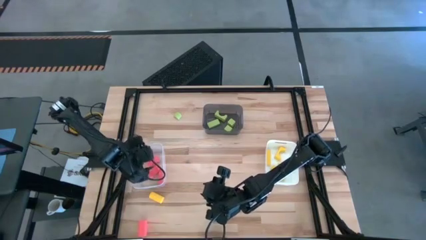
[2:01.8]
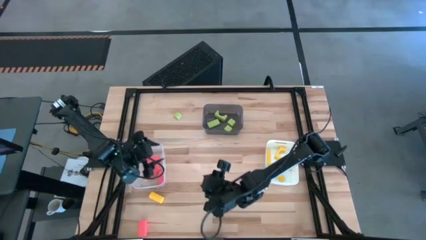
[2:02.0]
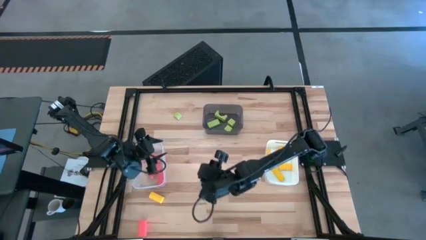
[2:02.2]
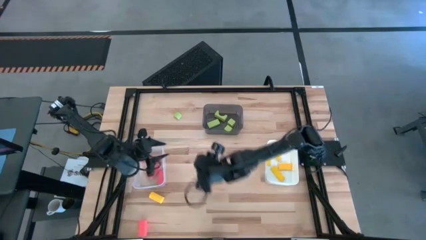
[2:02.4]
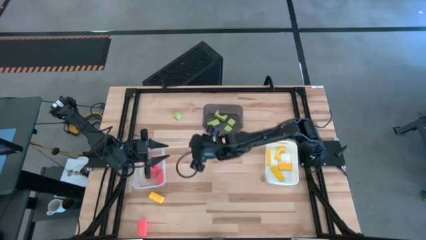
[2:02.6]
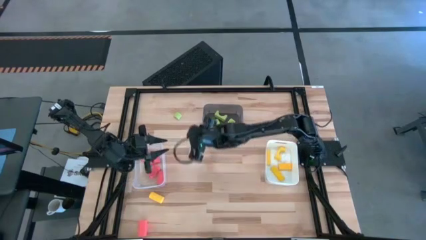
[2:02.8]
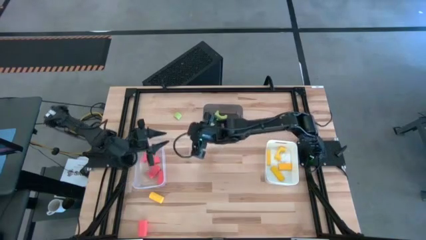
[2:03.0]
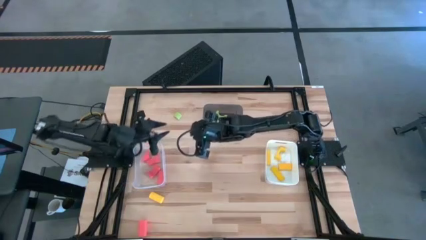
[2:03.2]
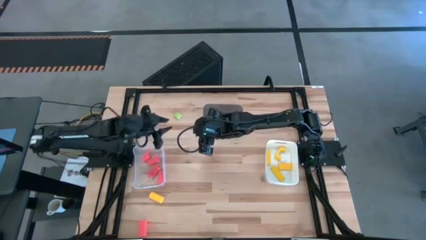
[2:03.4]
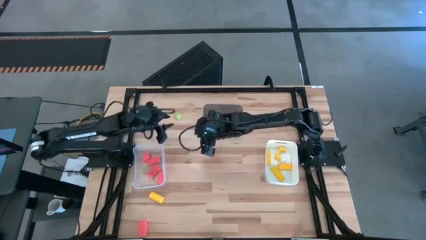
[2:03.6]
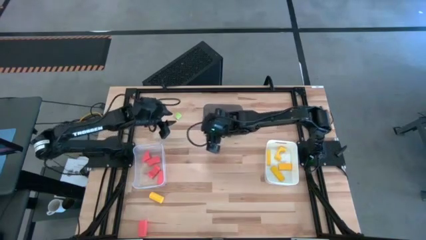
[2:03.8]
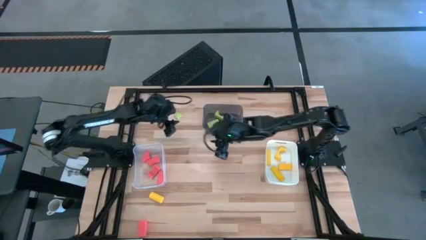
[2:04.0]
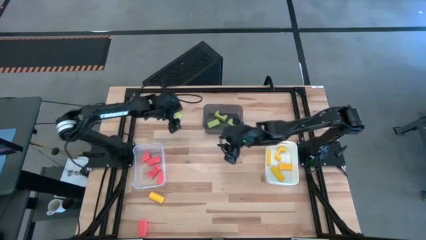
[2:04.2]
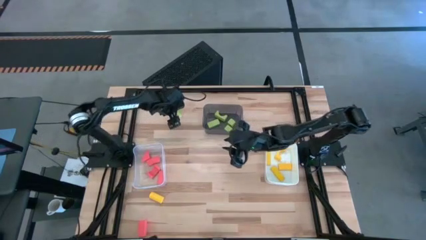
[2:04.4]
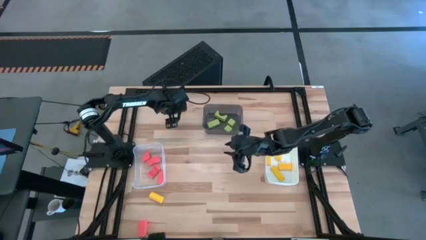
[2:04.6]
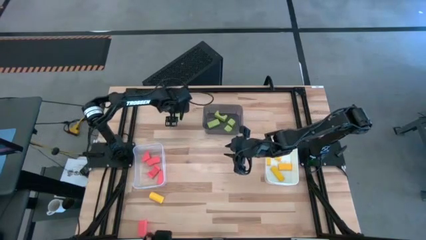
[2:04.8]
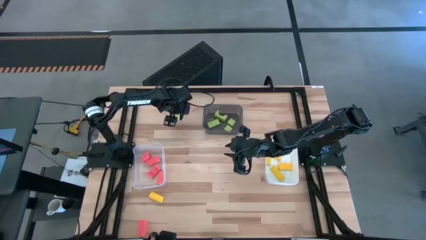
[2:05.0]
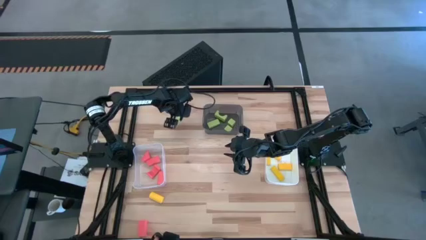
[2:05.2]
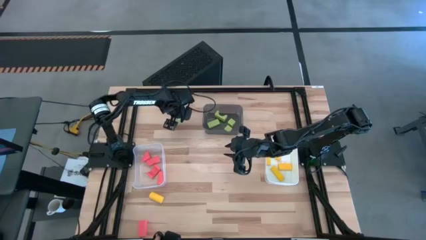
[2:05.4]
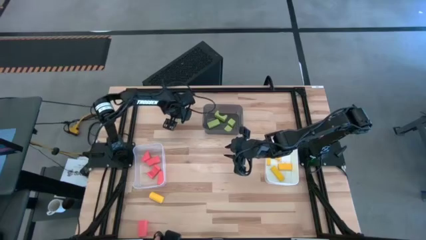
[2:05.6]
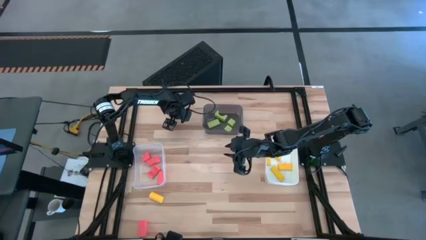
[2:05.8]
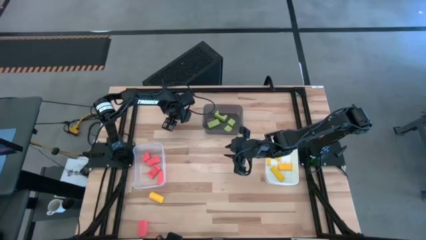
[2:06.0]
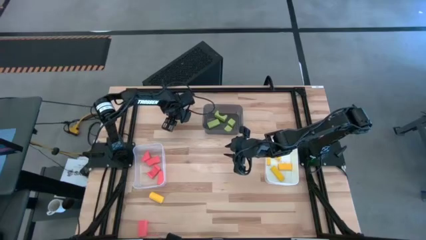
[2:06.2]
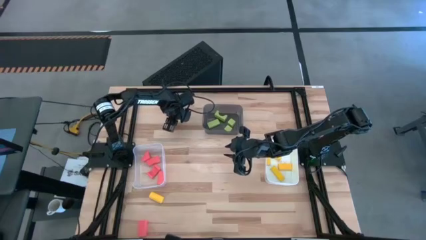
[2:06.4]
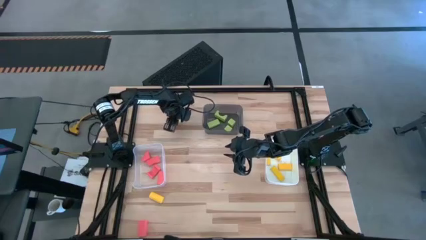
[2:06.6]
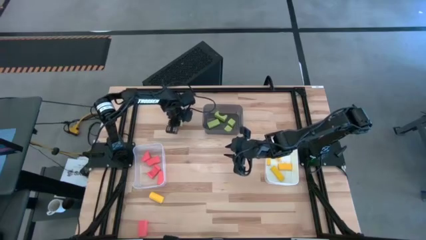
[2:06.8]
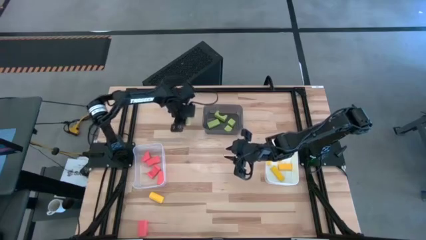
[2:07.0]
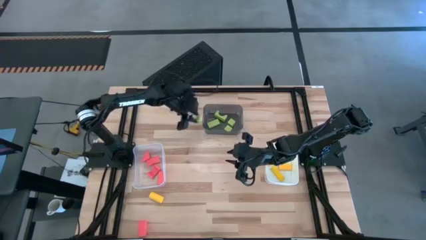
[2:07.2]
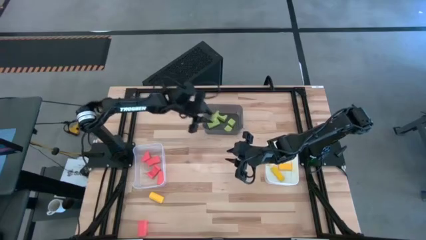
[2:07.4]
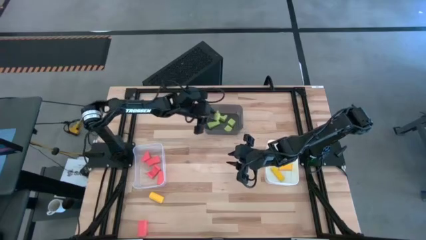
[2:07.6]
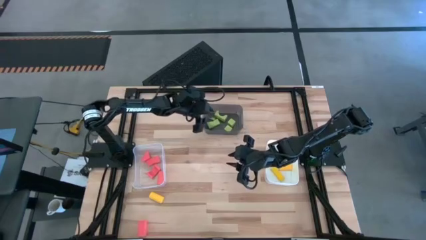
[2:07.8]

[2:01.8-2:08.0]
Task: Sort & place blocks by color
Put the green block into the black bin

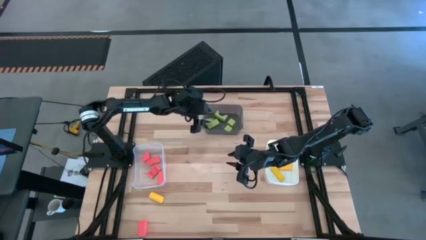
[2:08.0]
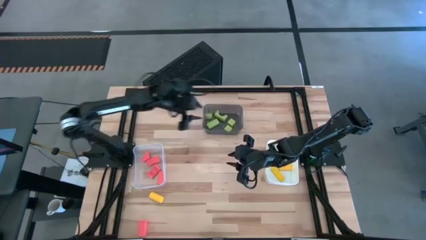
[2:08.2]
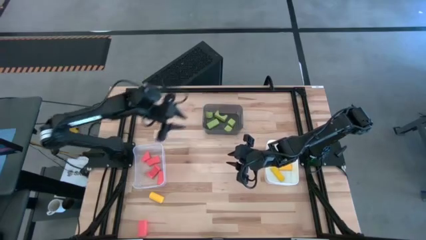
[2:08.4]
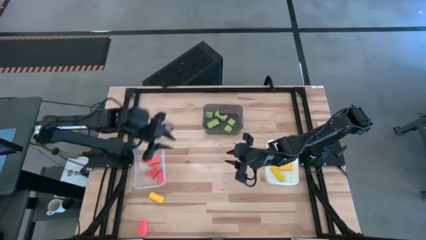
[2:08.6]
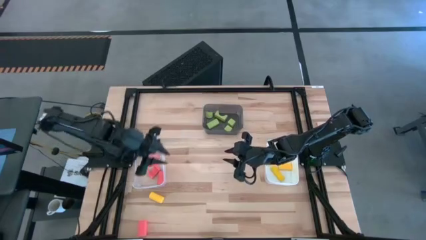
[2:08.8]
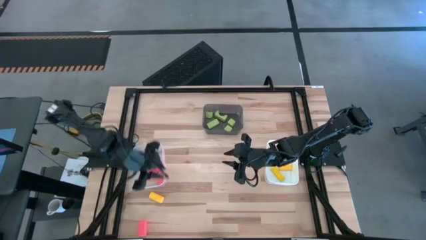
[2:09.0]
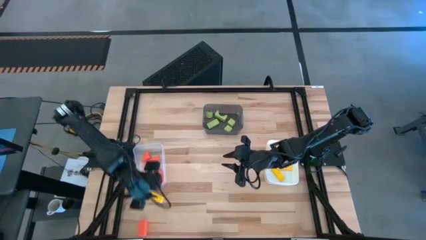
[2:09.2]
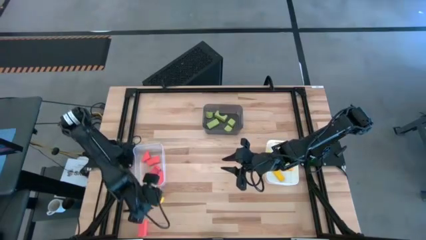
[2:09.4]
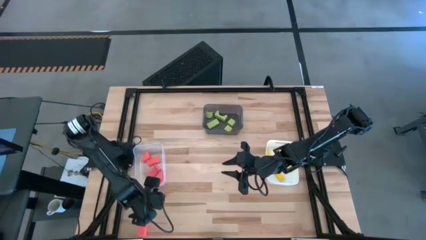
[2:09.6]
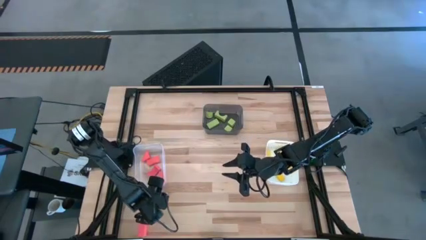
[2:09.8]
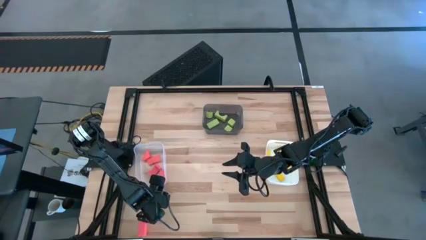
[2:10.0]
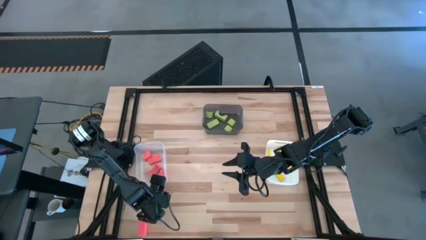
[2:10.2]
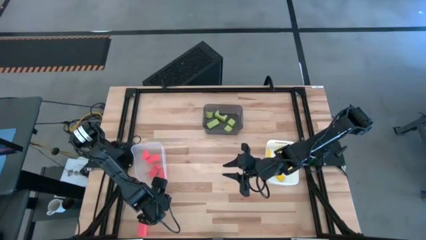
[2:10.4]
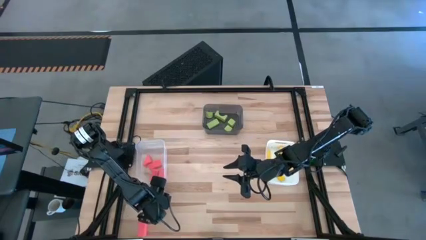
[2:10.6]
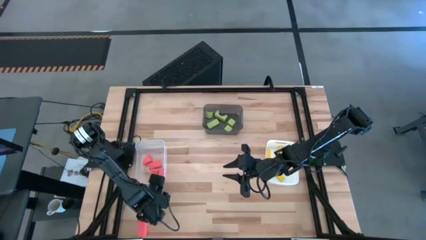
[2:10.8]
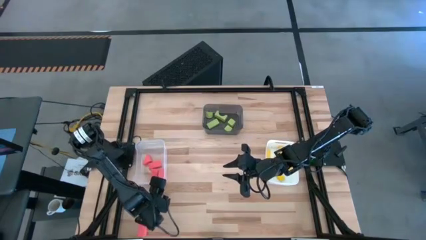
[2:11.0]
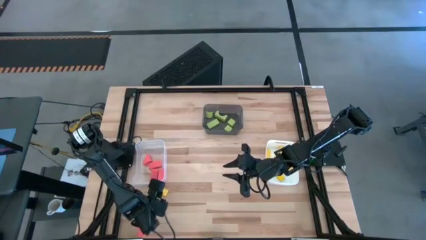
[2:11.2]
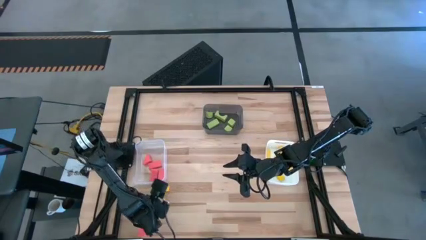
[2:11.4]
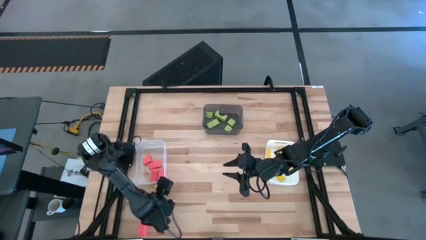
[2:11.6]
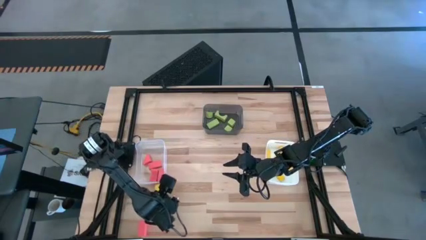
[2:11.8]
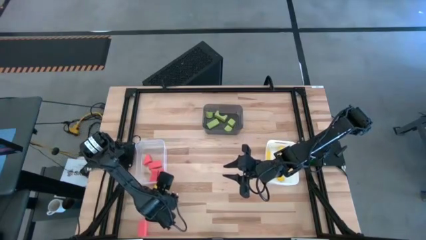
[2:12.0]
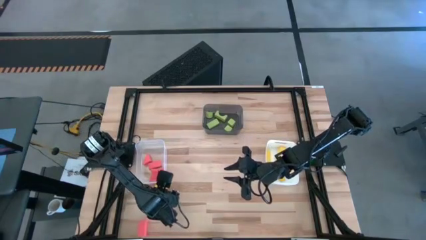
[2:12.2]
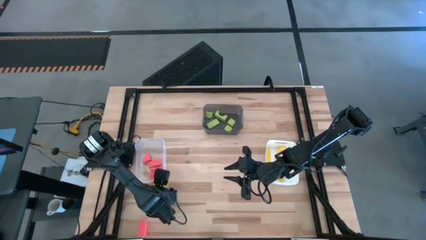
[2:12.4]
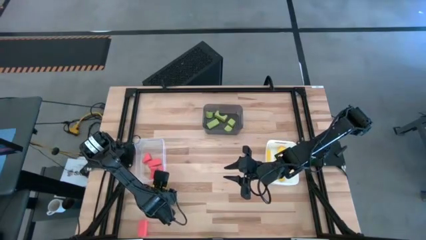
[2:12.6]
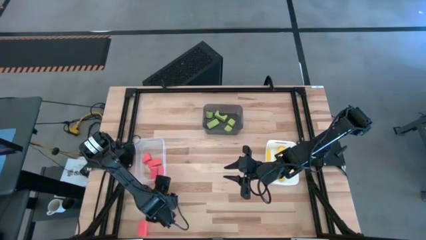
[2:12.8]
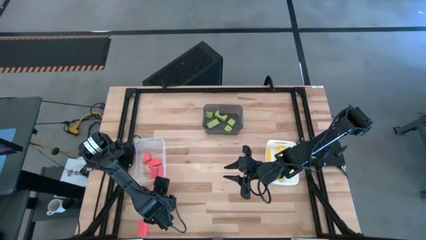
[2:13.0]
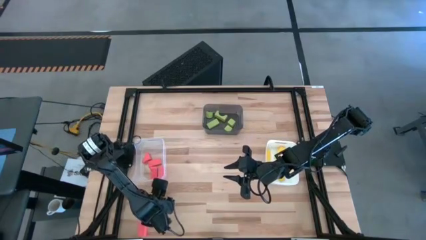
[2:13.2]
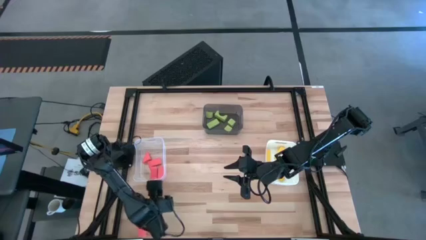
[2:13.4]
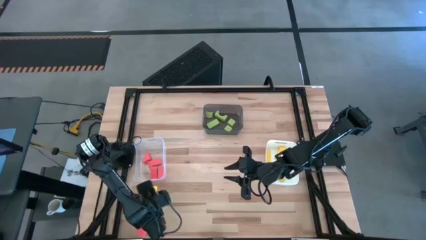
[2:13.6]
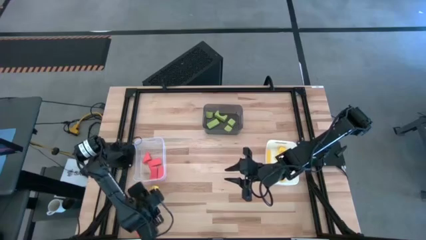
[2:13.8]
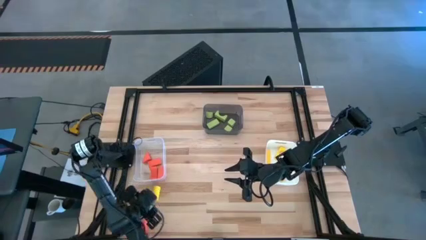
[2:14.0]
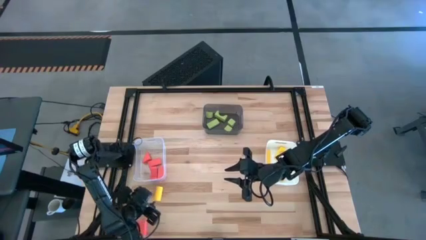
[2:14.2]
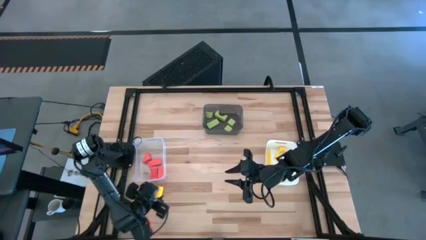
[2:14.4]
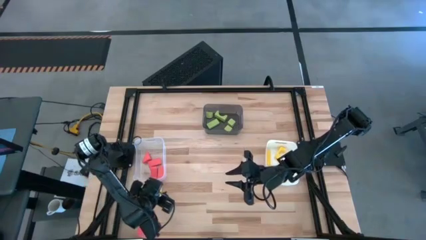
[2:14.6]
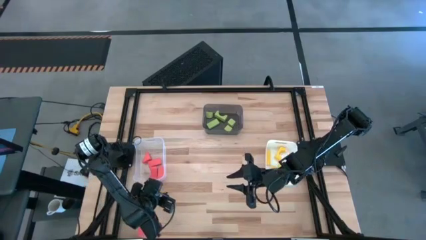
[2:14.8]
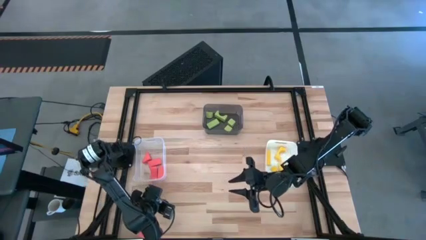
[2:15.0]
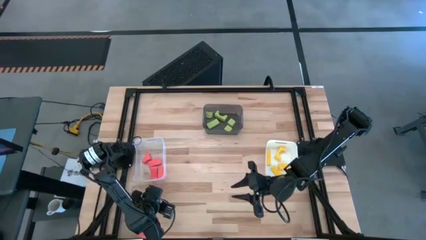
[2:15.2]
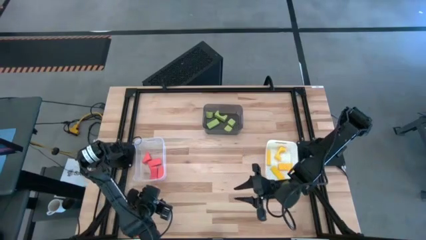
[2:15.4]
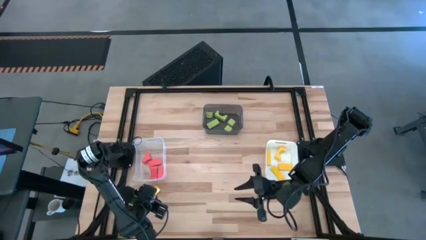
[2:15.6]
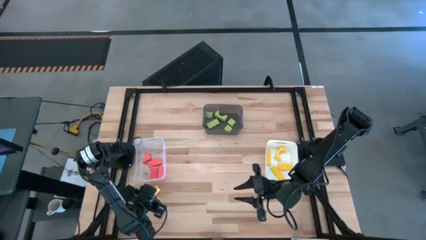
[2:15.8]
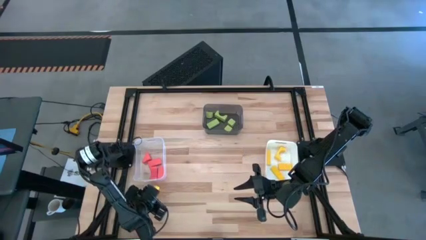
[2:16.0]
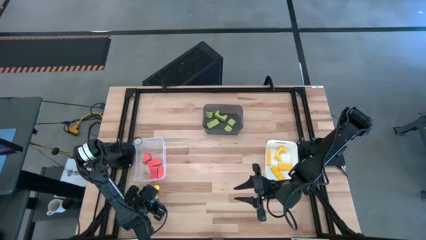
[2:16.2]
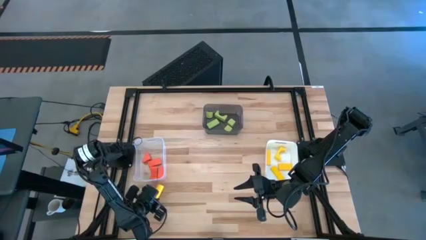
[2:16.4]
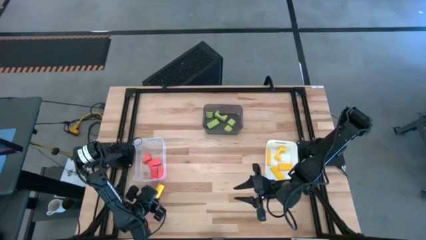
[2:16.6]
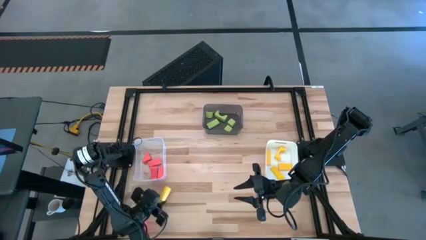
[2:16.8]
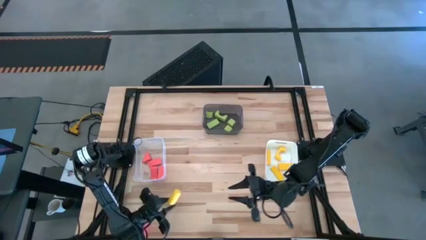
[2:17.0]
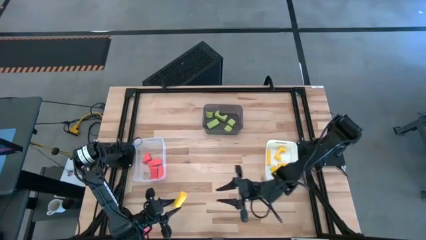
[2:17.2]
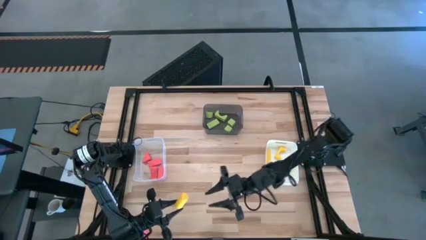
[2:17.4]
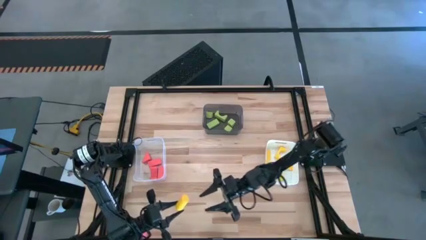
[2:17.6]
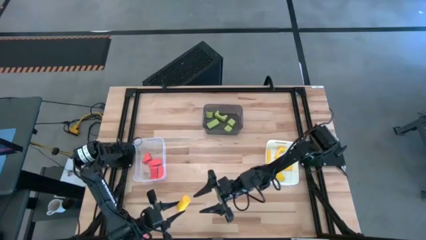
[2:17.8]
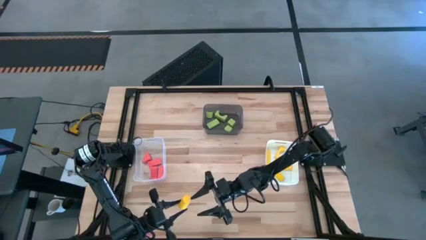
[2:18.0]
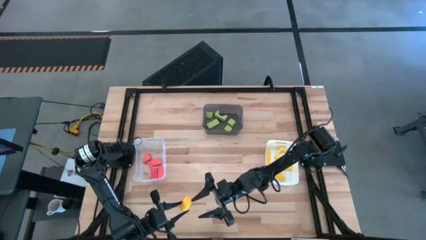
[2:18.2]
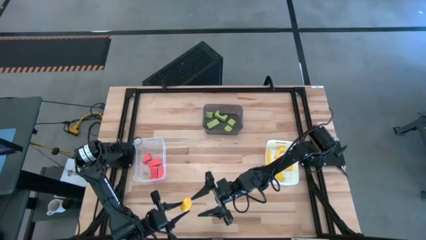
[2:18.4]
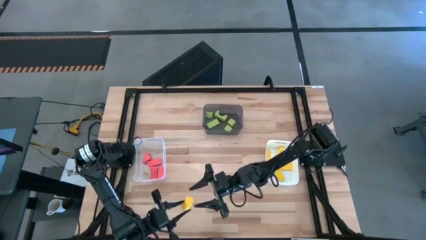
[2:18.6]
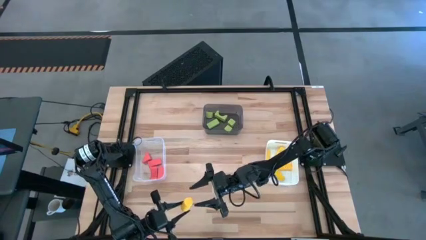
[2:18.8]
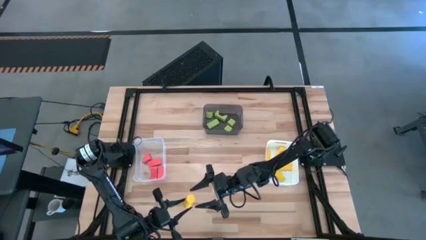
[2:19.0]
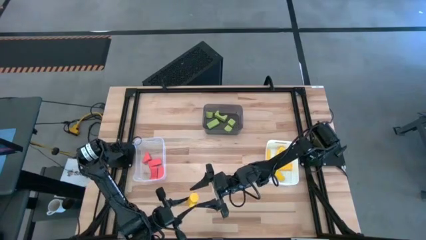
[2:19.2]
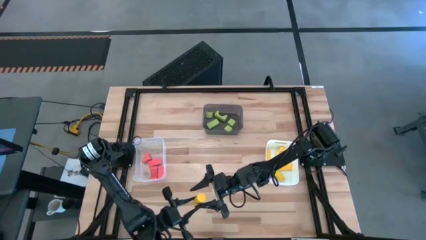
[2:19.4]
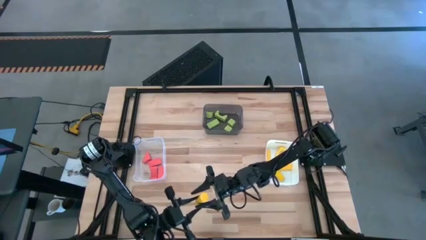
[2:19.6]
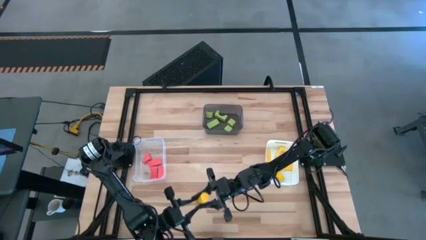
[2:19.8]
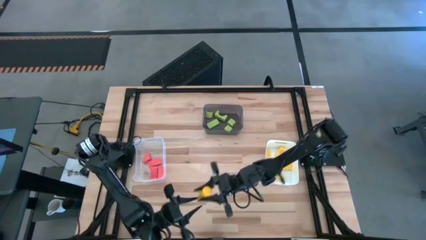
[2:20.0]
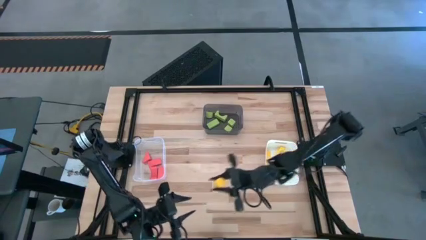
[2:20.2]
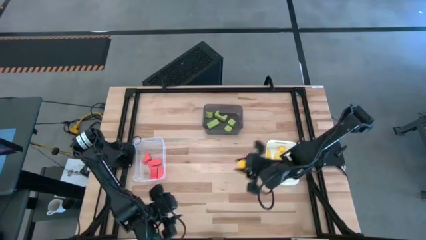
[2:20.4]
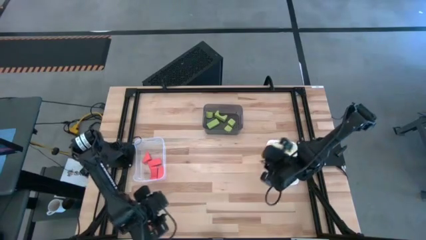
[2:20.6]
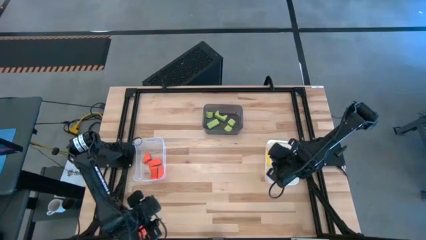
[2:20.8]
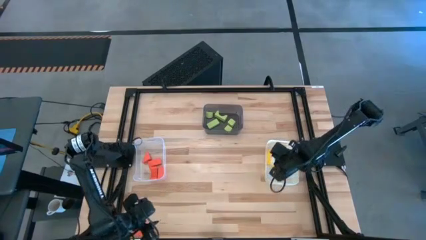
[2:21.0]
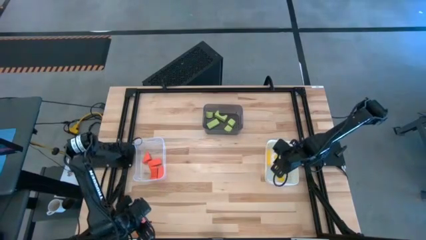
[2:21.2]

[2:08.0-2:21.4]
Put the yellow block into the white bin
